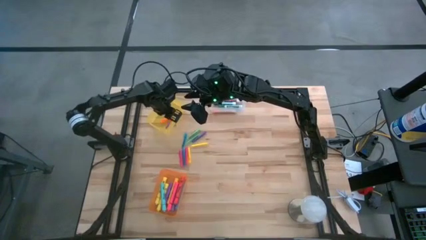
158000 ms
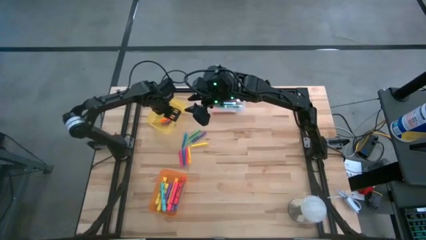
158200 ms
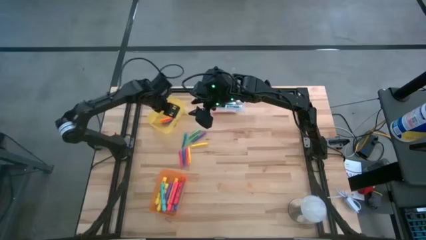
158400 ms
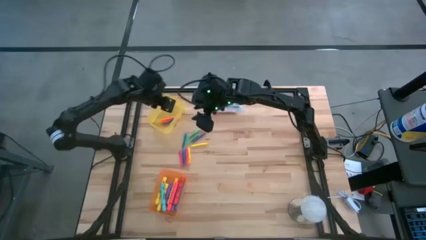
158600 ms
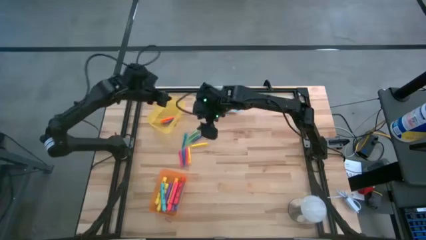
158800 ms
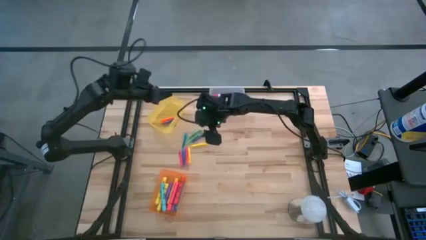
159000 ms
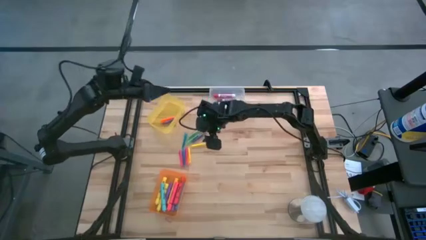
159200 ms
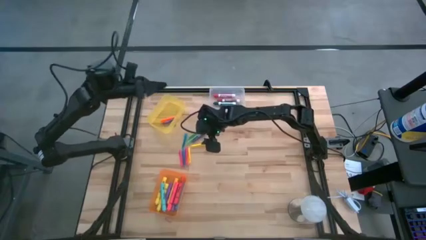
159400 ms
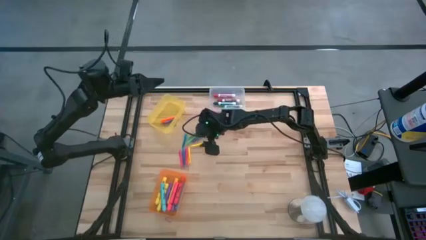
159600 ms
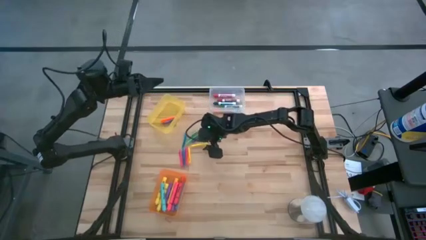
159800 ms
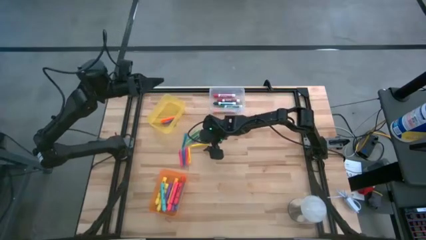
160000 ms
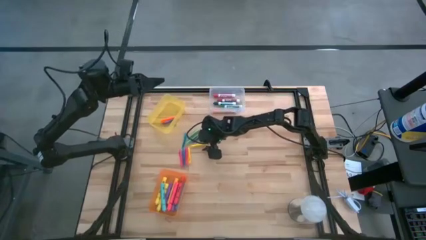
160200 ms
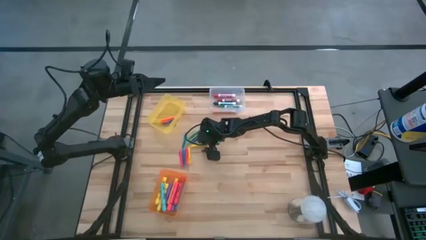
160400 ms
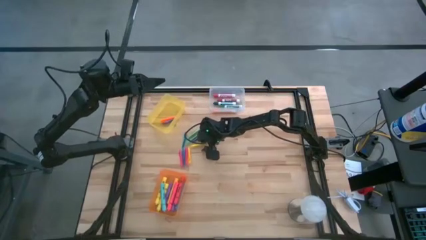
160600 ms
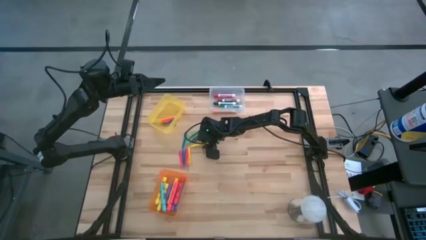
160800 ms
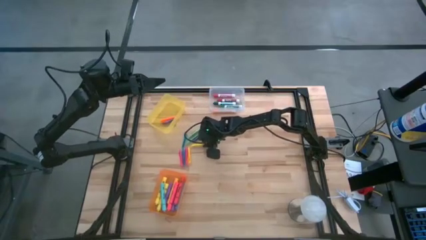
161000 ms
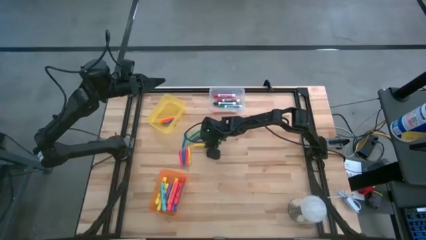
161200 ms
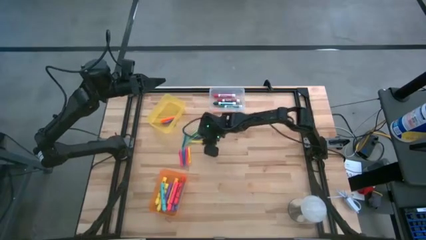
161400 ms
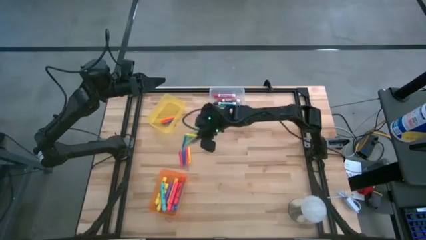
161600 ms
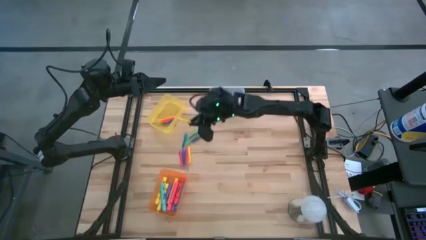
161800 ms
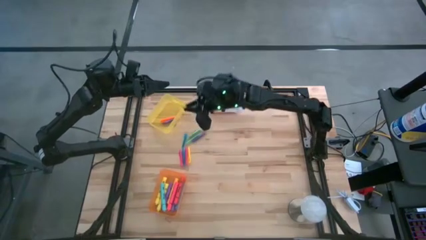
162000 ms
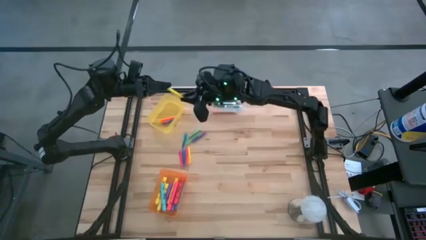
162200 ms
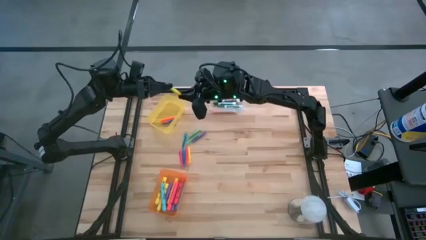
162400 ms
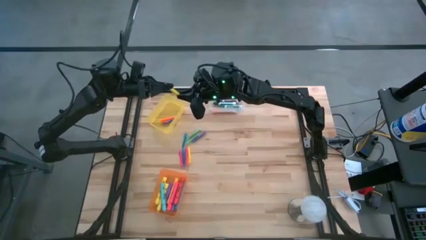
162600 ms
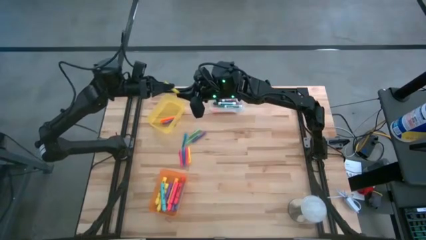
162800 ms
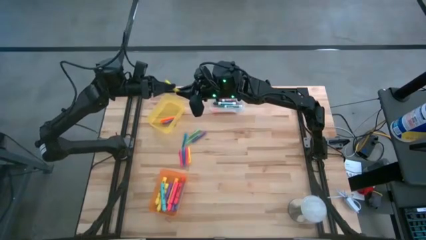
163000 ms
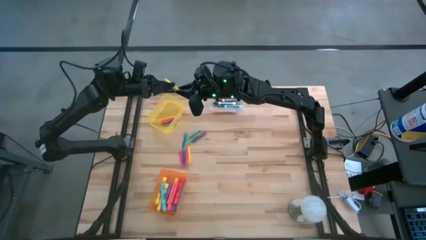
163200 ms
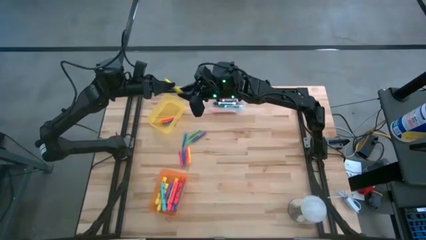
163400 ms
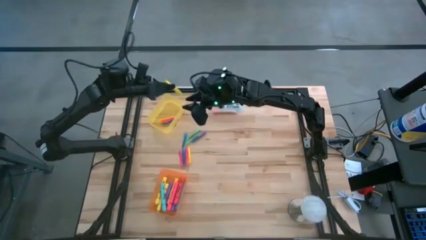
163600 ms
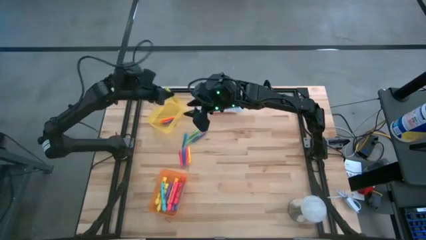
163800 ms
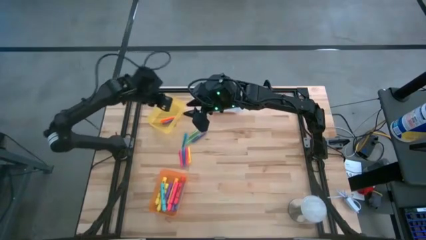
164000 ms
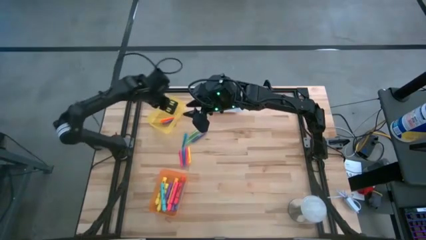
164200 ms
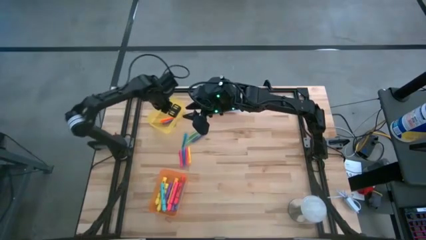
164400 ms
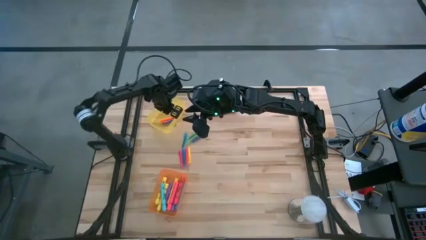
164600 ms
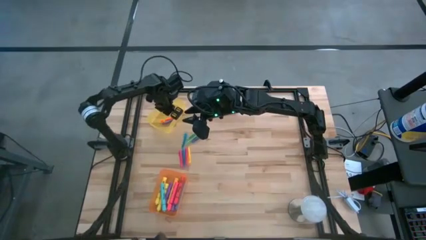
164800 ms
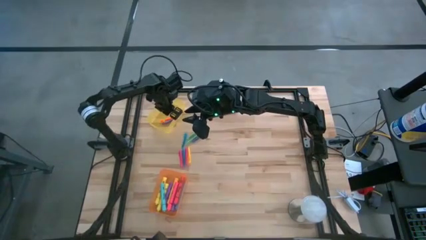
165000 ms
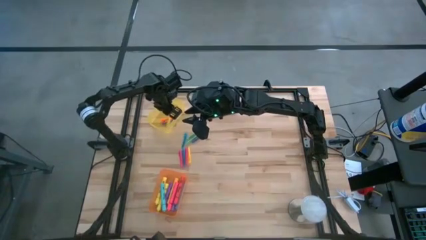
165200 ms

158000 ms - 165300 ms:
Task: Pick & Place Markers
Put the right yellow pen into the yellow bin

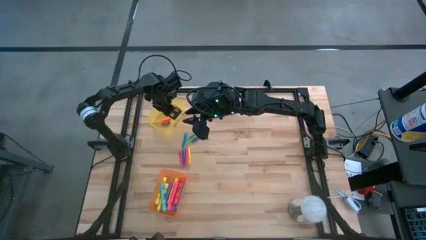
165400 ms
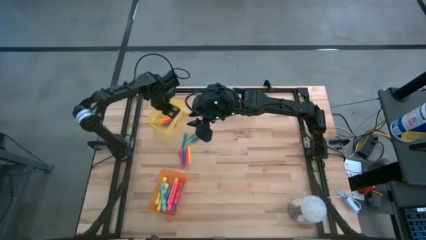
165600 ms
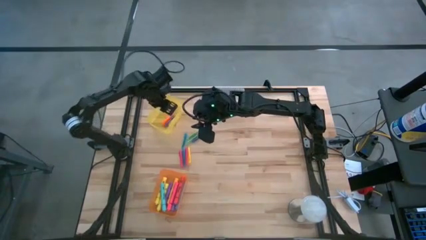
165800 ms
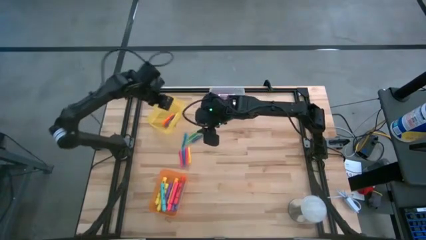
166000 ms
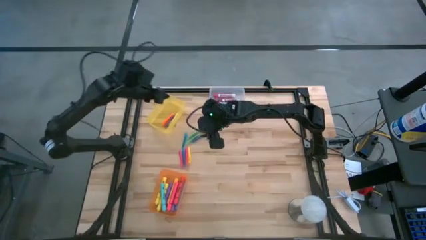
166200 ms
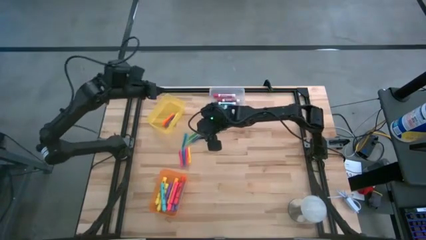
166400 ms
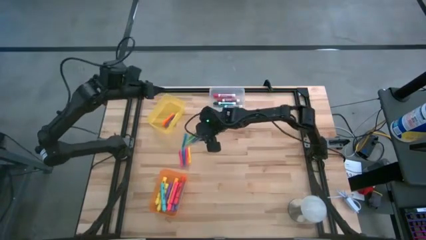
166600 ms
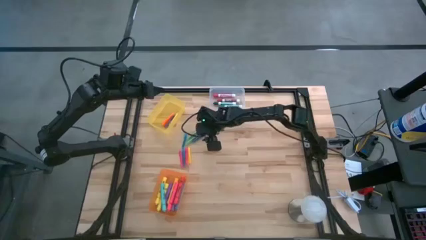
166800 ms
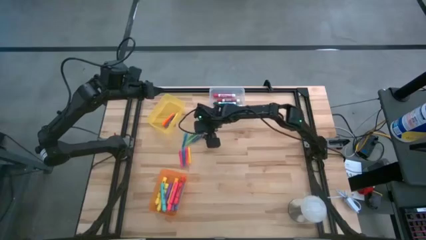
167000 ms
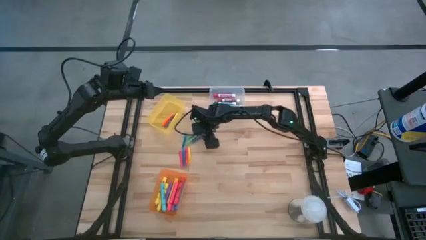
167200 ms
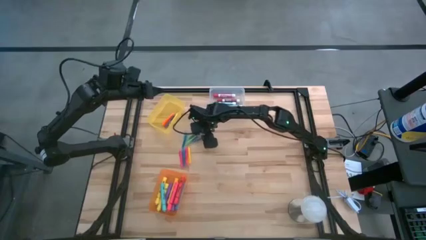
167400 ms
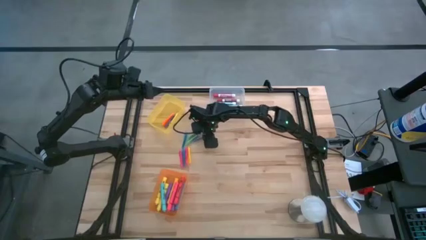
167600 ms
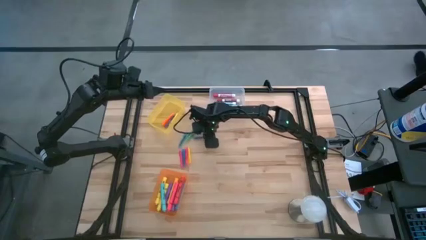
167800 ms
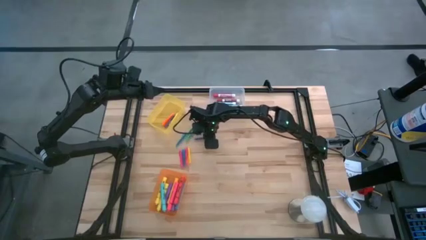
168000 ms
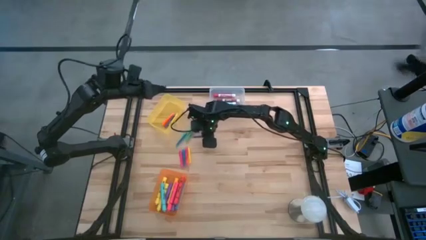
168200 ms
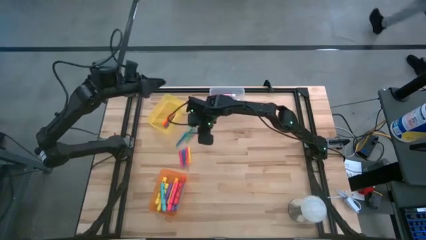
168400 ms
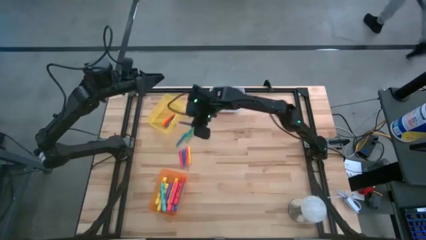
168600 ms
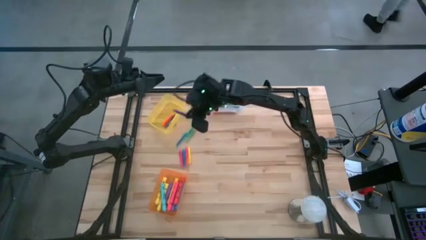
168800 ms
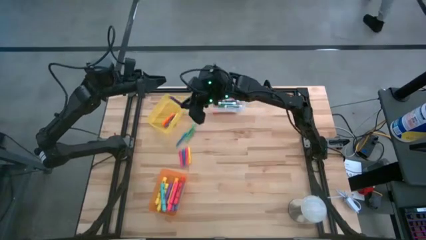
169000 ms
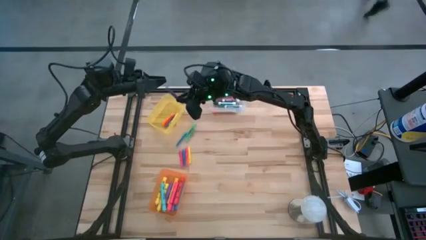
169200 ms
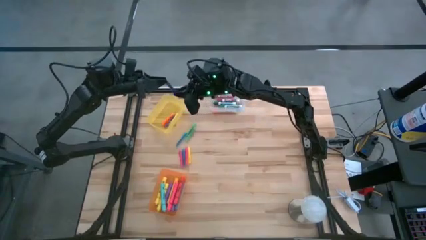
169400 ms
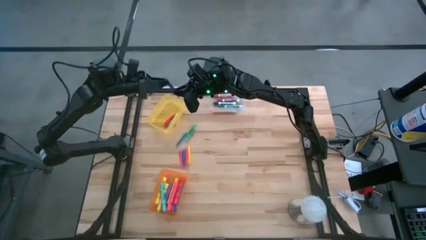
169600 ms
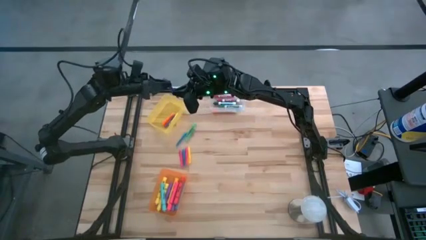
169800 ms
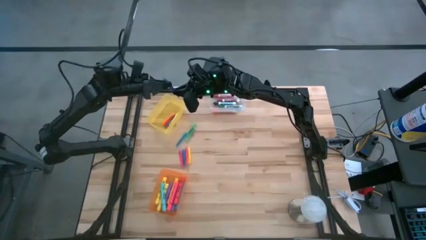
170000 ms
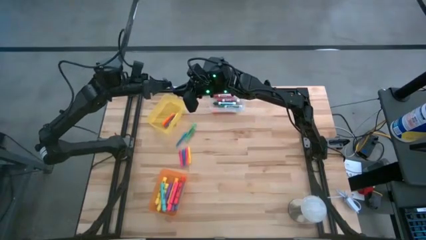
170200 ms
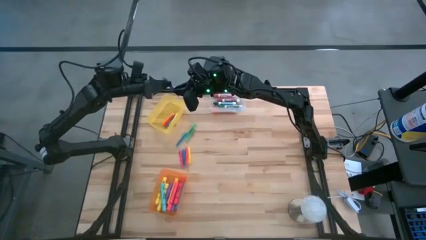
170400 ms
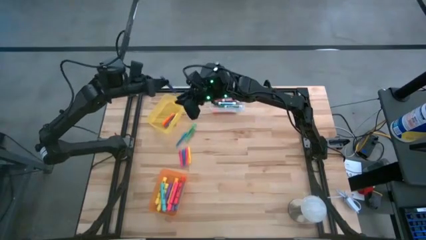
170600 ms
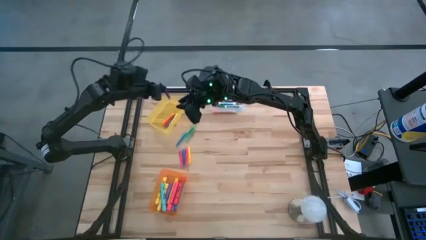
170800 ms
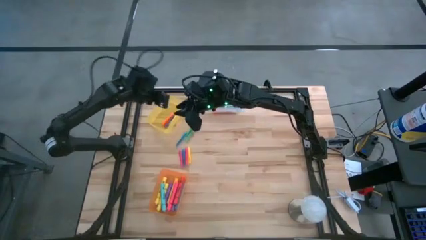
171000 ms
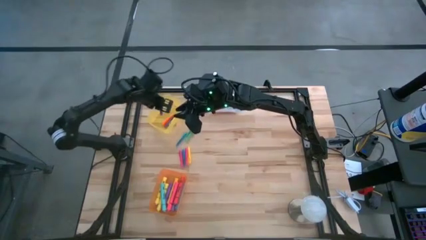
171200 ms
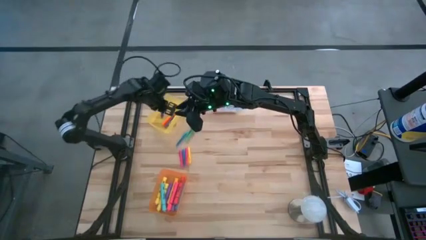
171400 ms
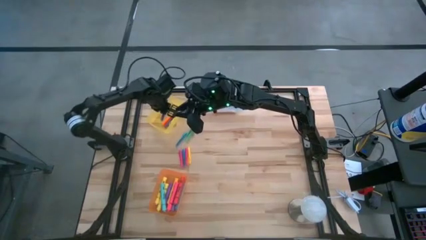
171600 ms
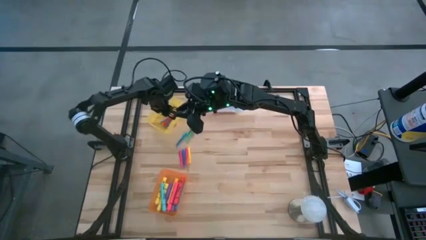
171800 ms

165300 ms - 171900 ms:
Put the purple pen into the yellow bin

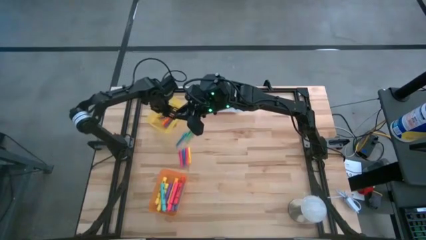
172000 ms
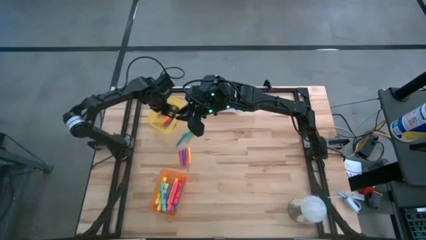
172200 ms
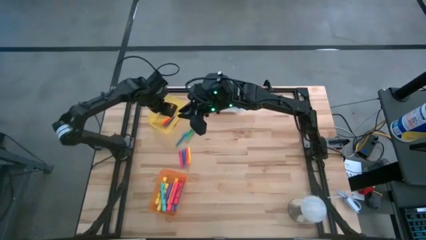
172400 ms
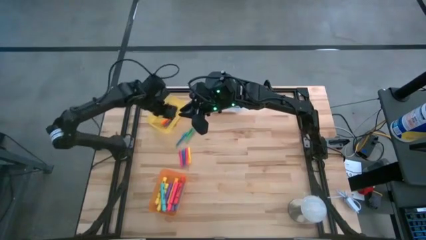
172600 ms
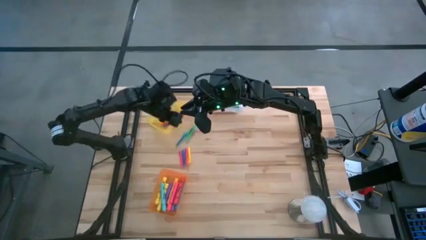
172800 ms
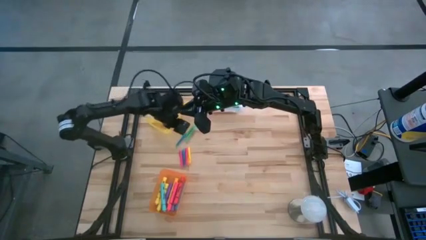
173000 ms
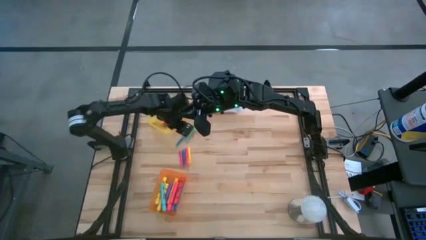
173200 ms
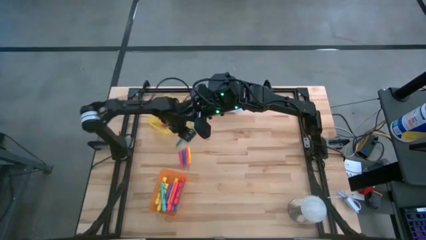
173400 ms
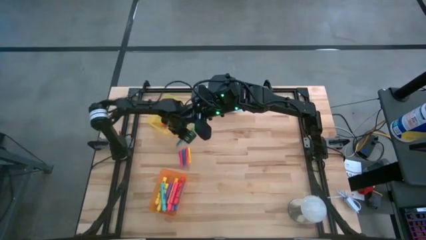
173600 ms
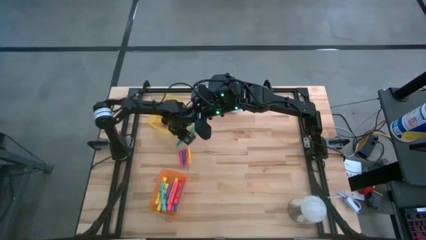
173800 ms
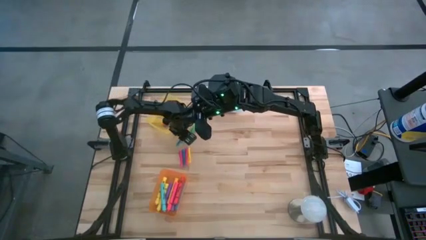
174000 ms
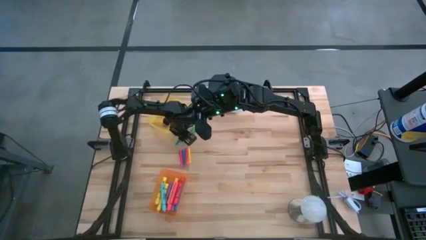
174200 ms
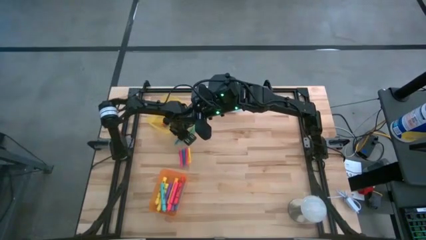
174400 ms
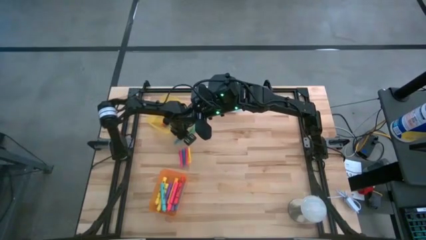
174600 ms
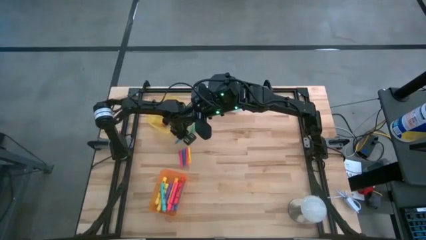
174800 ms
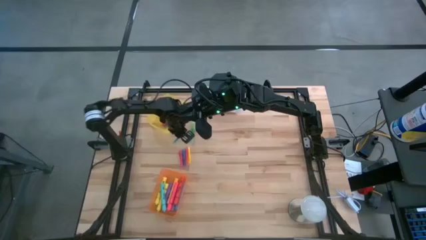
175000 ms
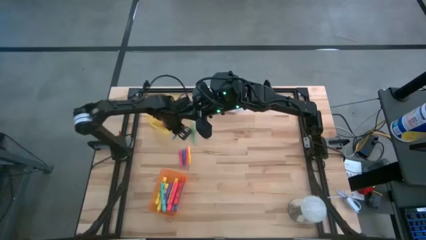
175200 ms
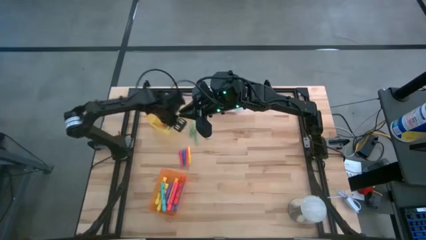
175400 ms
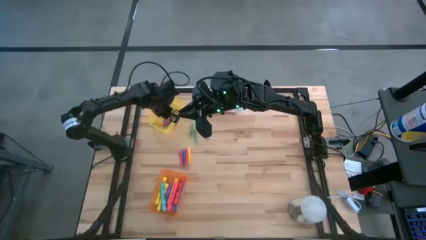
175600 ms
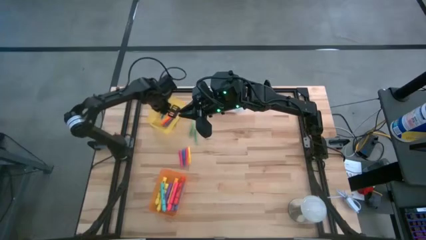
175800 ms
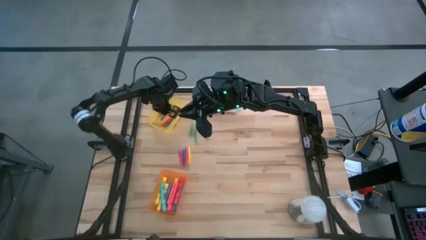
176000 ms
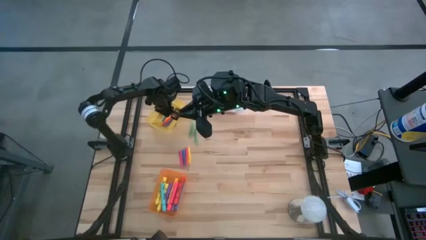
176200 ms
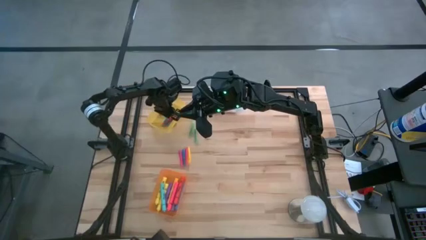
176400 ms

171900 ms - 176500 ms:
Put the top blue pen into the yellow bin
